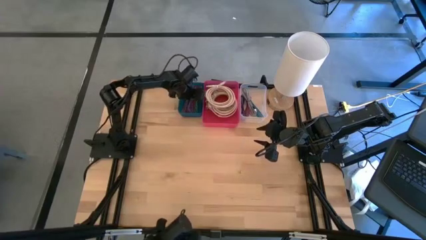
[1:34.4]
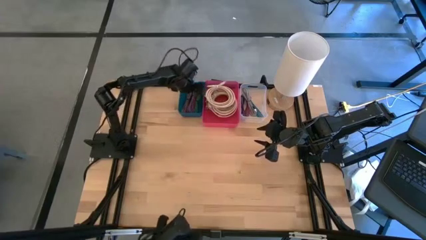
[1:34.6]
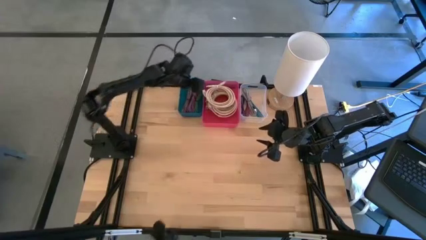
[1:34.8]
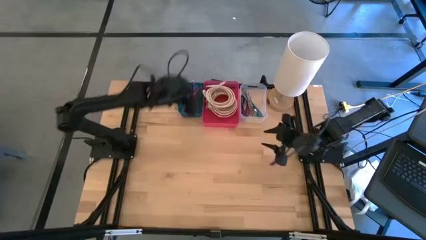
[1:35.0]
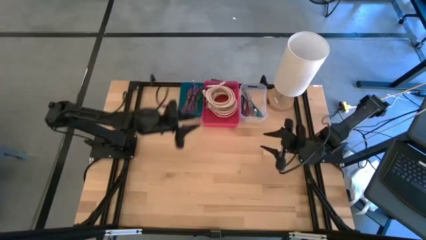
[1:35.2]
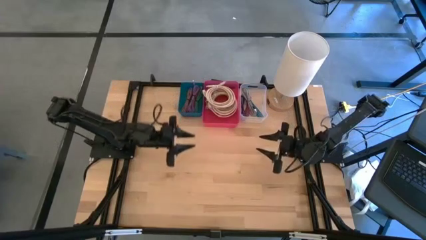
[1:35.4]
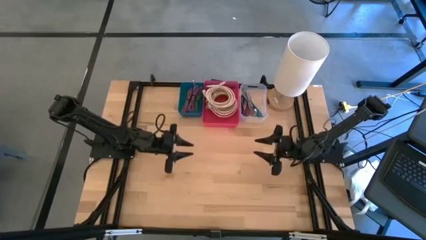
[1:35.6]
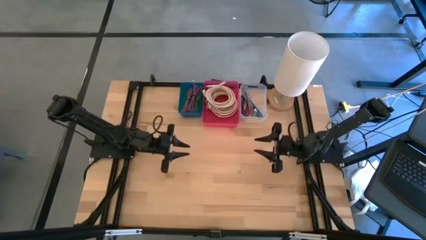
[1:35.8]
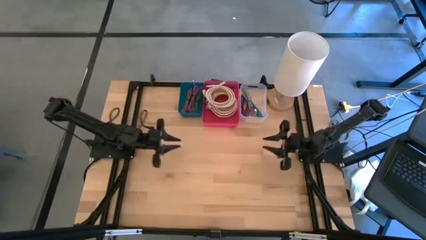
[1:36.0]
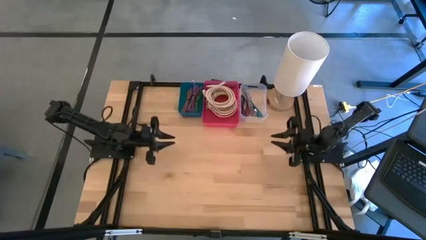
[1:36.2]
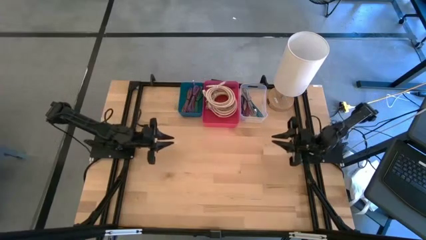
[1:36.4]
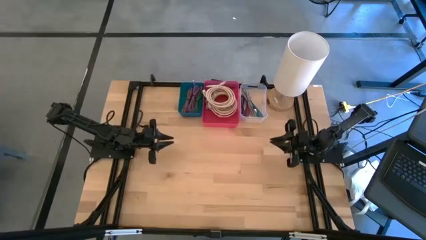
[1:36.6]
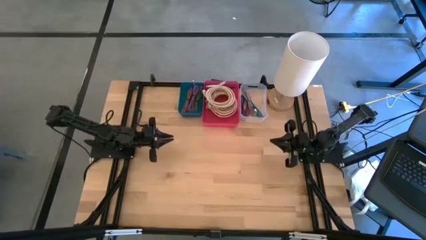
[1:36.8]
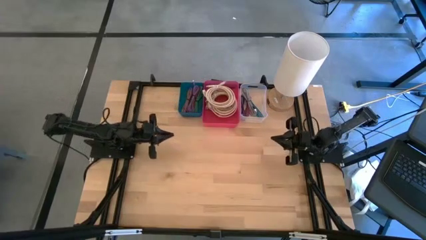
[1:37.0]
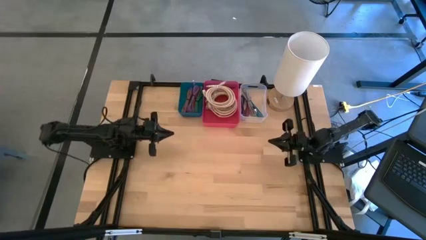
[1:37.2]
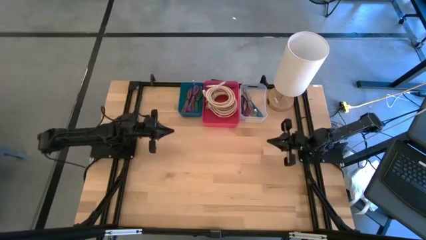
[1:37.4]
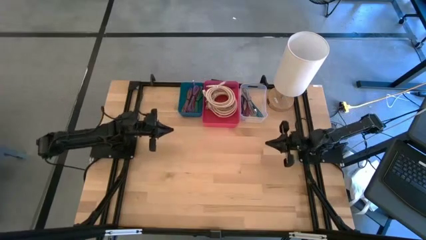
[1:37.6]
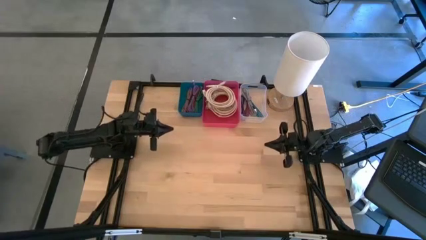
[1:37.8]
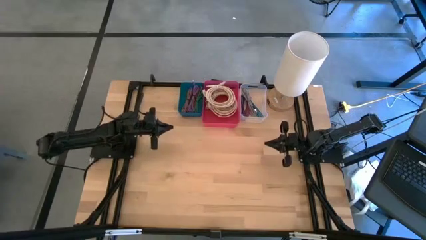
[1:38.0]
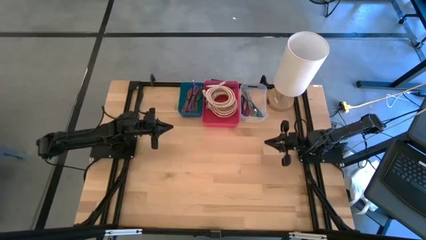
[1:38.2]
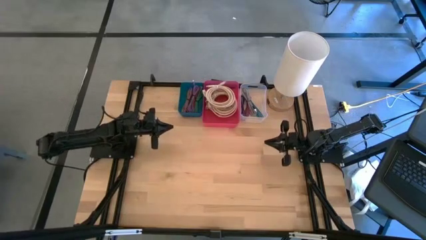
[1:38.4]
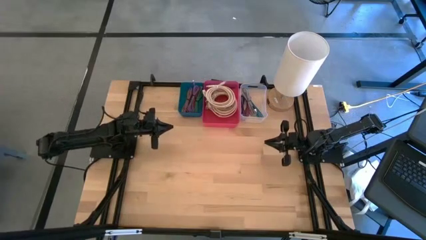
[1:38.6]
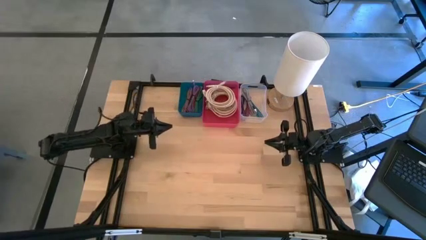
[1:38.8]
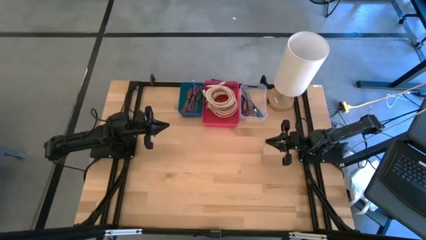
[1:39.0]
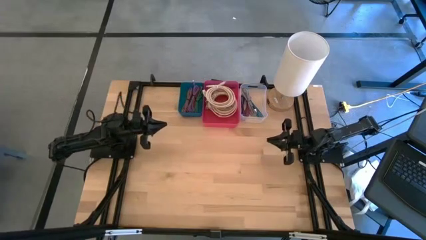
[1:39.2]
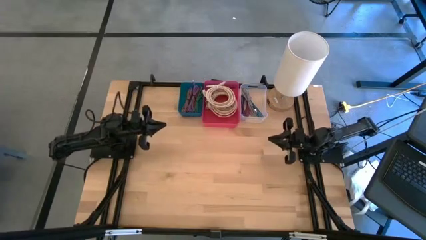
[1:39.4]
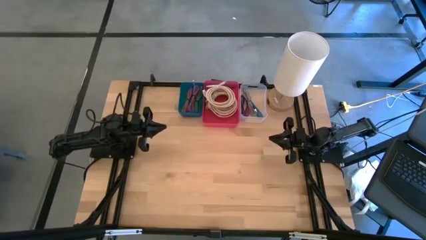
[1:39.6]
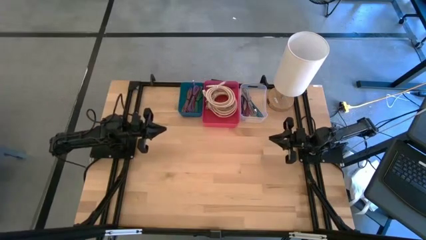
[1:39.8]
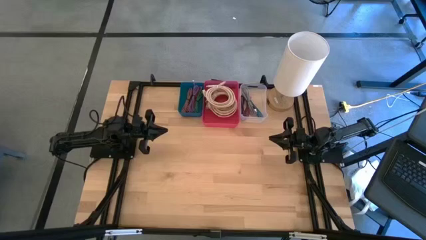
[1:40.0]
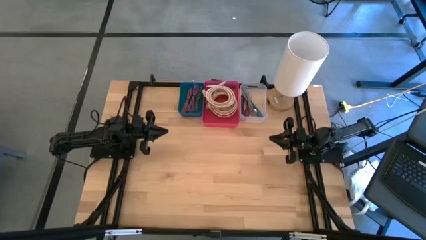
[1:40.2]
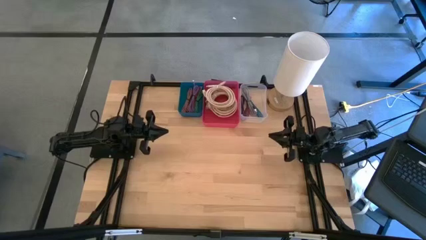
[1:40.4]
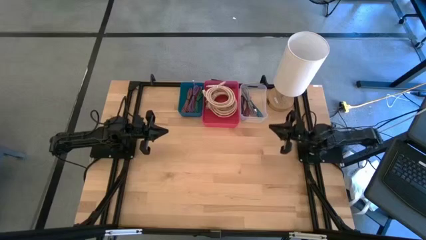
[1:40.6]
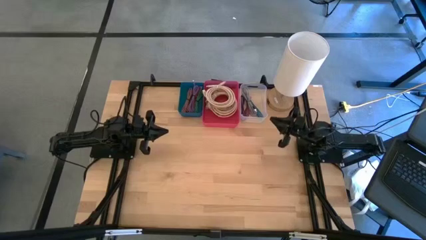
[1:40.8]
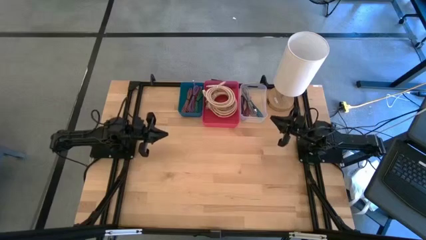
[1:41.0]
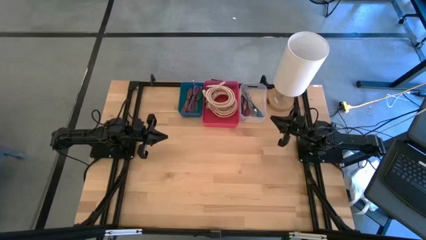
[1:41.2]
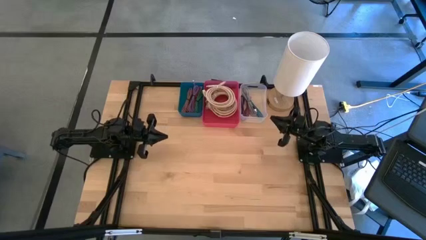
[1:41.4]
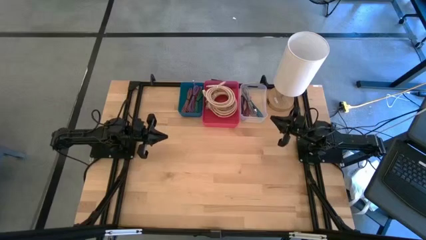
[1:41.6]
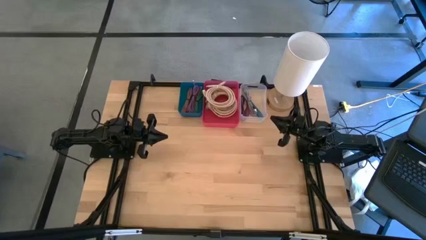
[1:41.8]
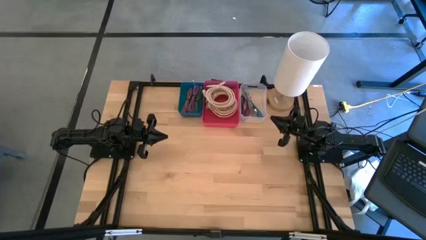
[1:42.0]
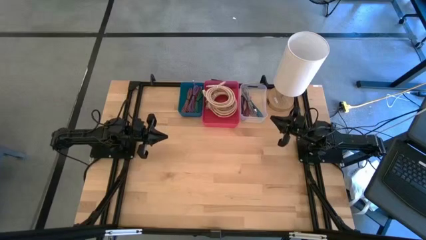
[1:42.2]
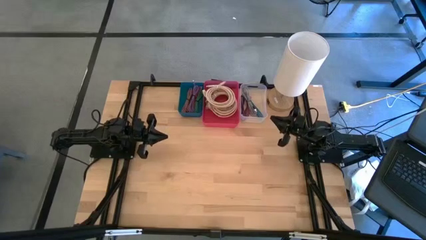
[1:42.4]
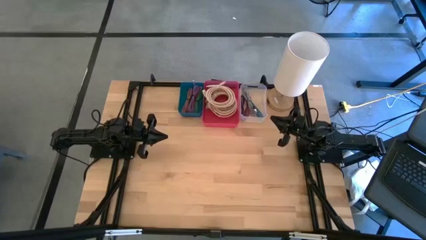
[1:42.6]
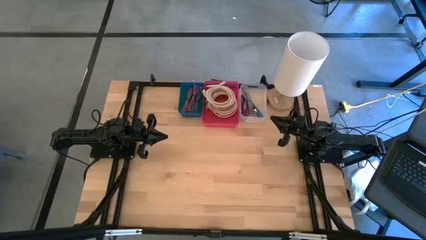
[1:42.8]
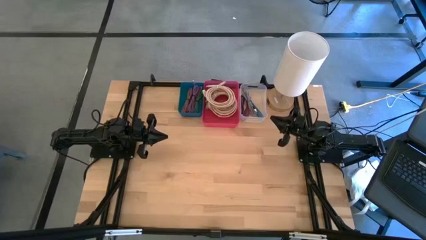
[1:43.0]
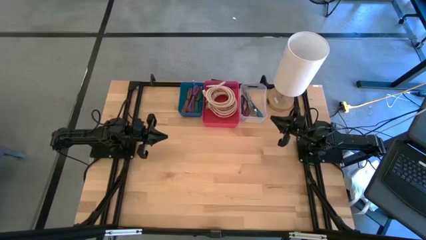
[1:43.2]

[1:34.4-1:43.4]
Task: Pick & Place USB Port
Return to Home Position

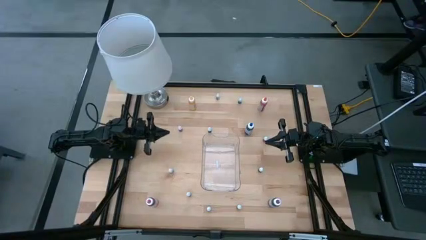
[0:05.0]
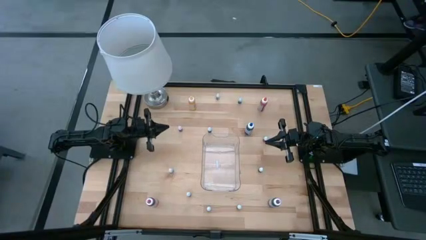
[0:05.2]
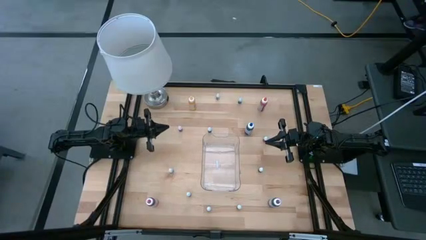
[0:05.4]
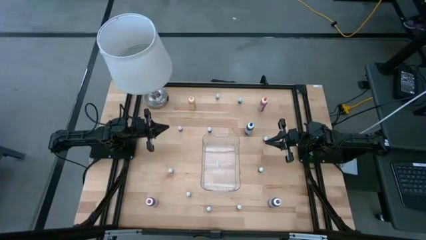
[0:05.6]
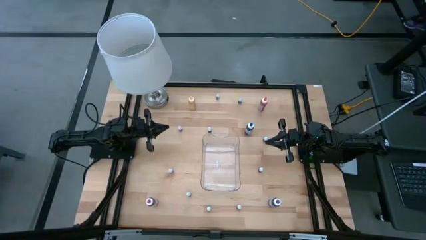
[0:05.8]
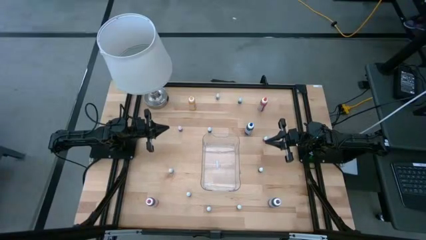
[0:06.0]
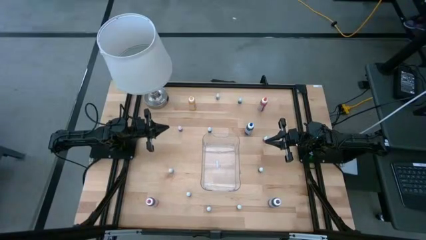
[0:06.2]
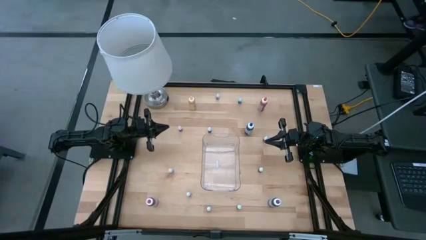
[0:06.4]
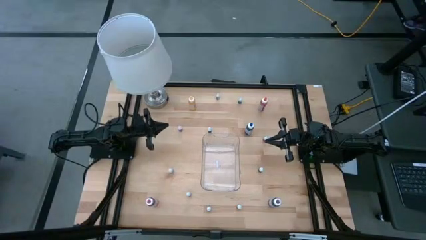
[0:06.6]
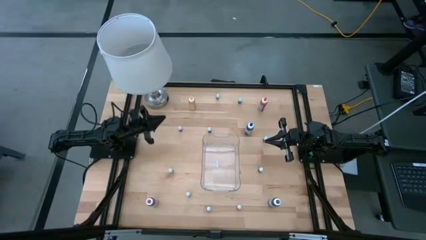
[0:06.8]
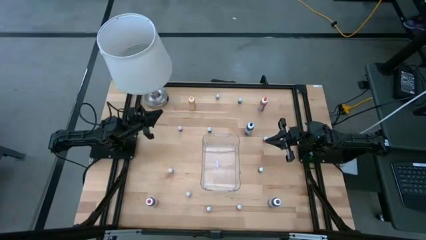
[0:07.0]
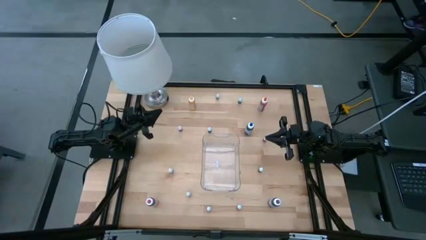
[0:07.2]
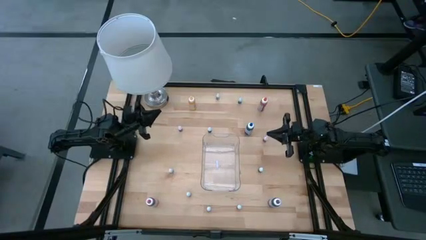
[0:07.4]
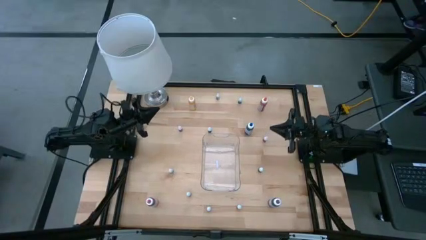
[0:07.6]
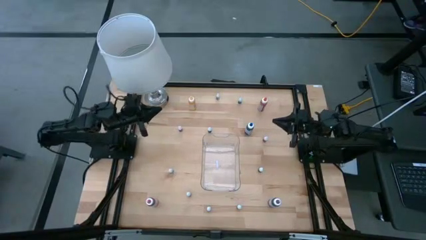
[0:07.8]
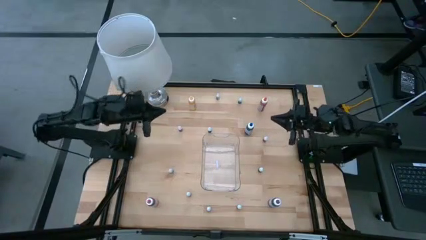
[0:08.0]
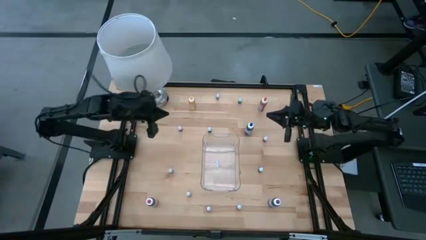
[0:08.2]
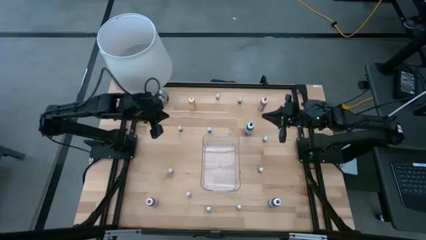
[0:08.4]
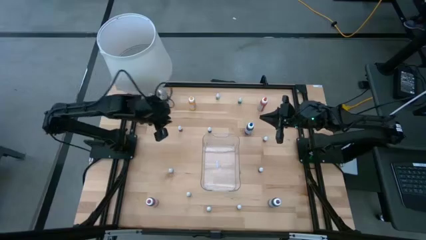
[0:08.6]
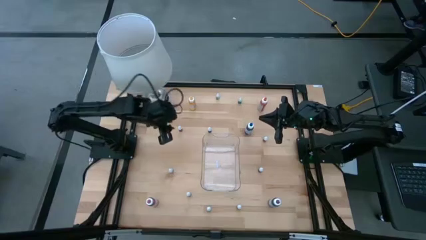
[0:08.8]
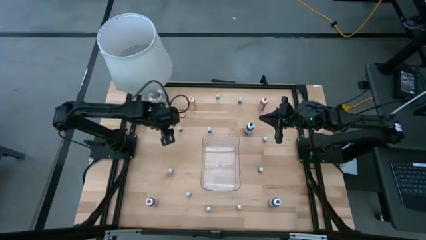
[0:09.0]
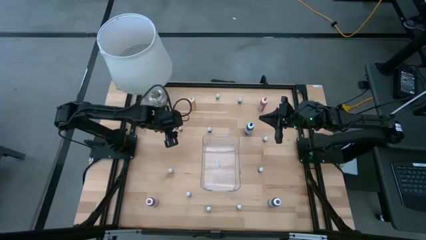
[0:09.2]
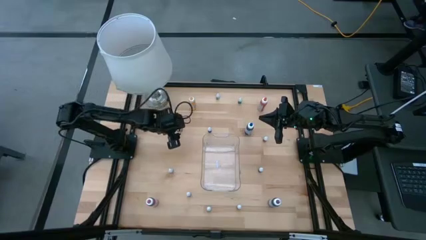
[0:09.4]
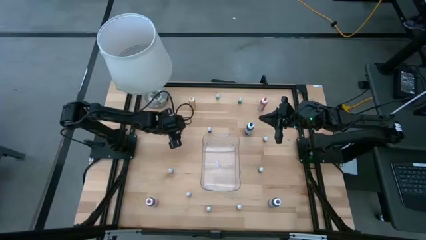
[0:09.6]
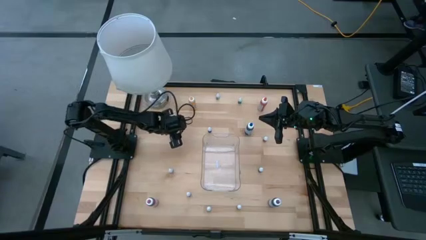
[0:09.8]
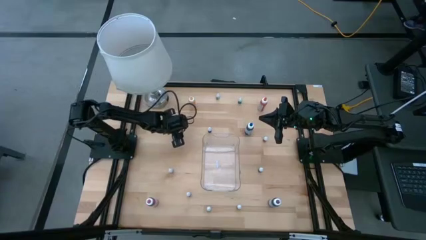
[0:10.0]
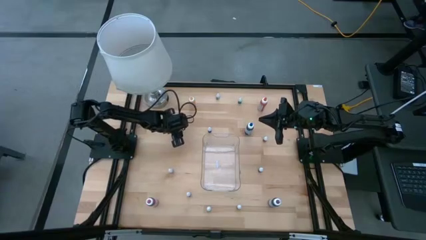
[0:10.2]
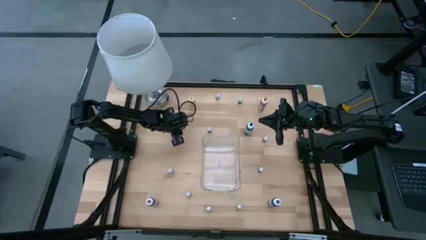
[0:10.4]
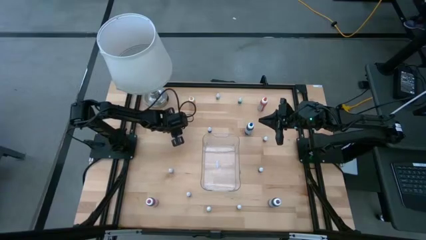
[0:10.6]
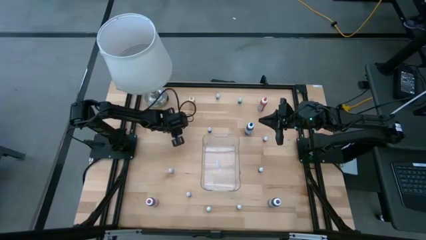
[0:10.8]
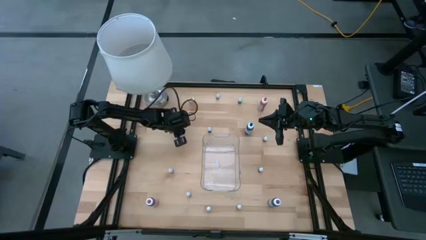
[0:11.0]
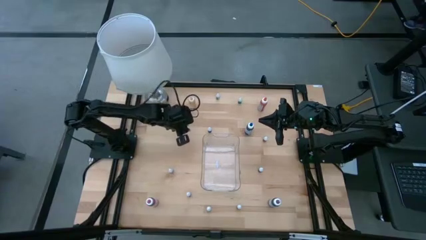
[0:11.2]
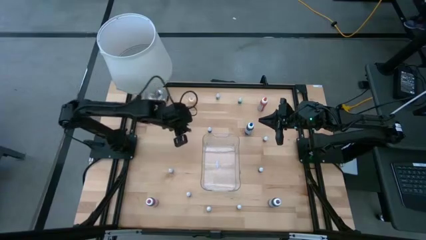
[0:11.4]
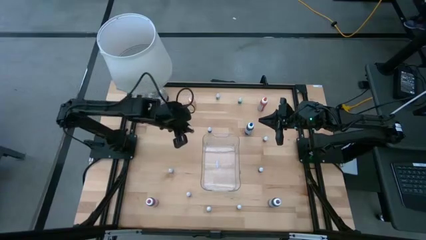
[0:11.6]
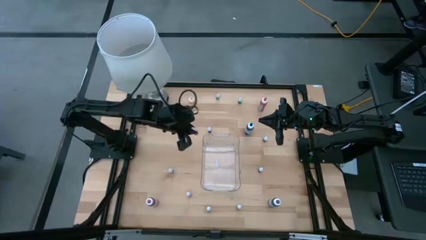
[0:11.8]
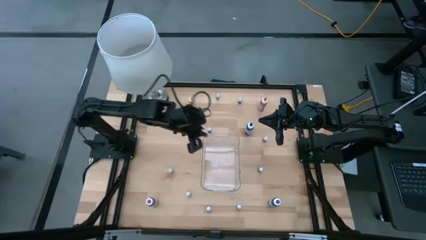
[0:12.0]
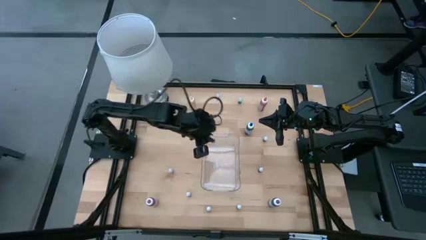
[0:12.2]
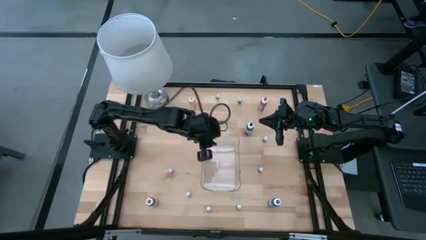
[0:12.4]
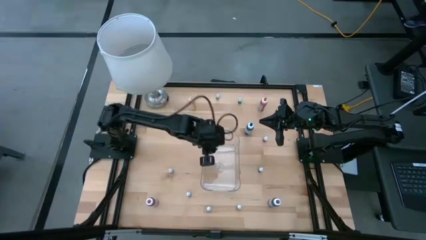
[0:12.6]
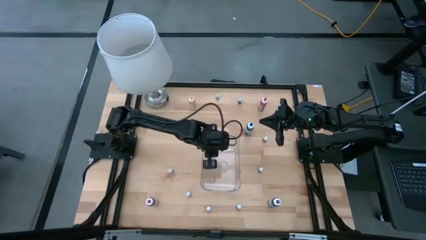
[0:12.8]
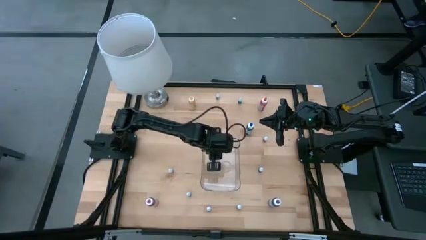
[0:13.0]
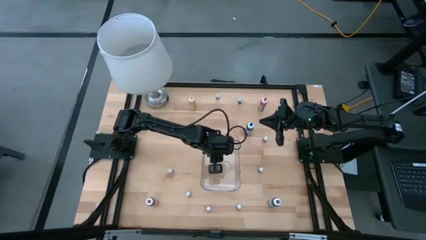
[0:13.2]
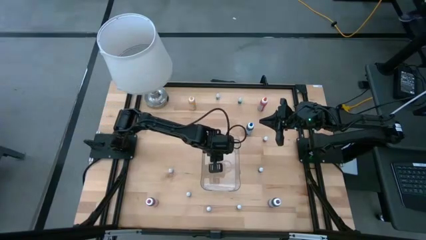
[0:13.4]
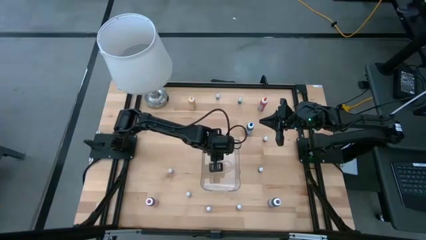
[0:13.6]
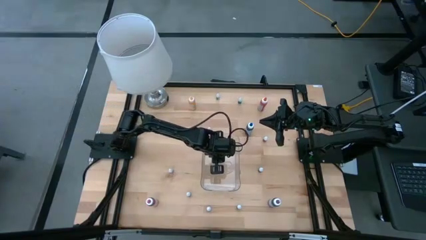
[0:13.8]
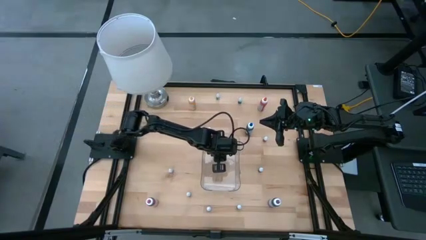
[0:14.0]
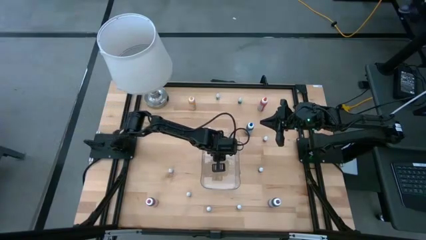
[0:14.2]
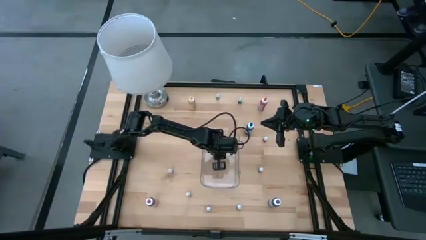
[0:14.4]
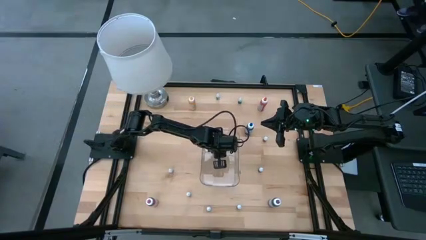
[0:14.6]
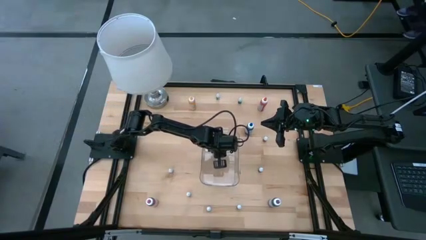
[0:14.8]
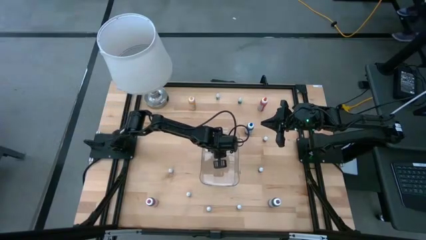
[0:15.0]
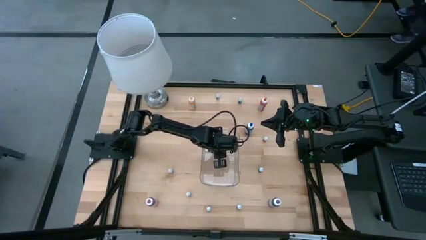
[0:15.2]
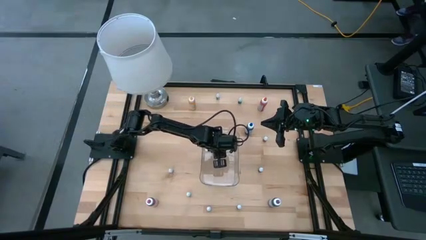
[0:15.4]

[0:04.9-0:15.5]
Task: Pick & Place food coloring
Put the small pink food coloring bottle into the transparent container
